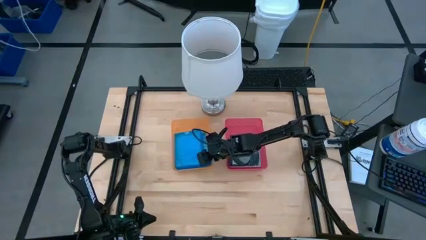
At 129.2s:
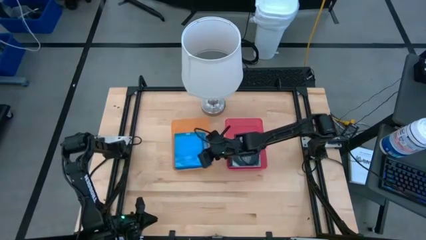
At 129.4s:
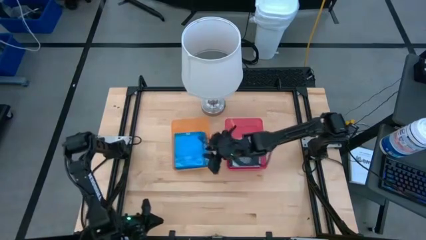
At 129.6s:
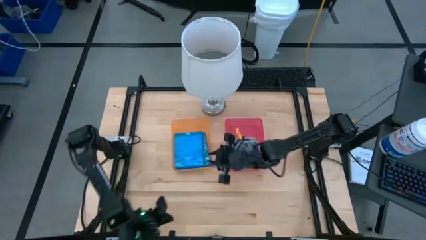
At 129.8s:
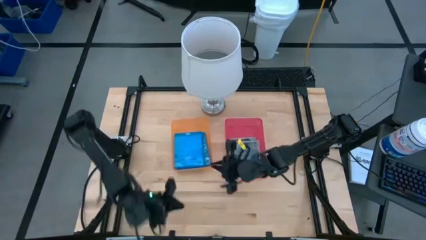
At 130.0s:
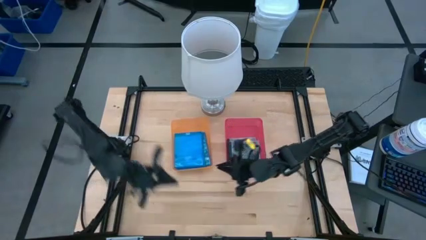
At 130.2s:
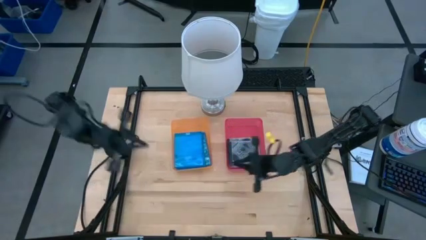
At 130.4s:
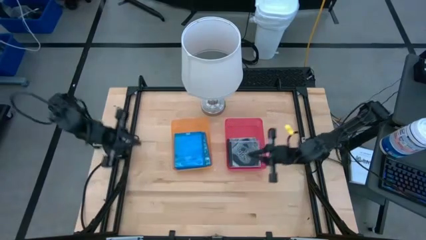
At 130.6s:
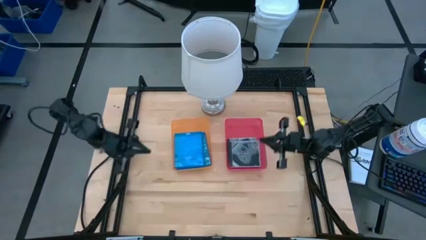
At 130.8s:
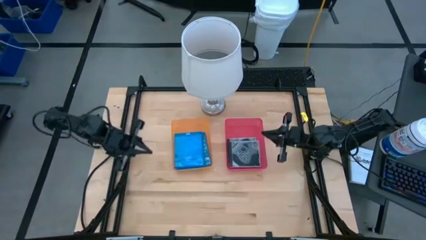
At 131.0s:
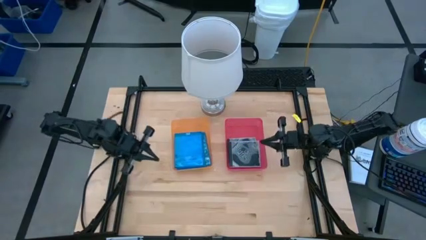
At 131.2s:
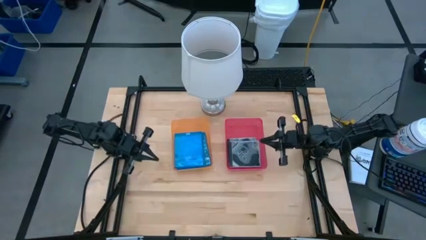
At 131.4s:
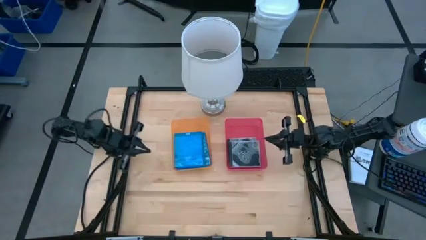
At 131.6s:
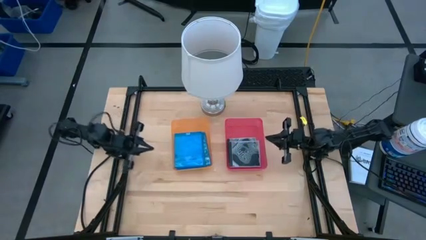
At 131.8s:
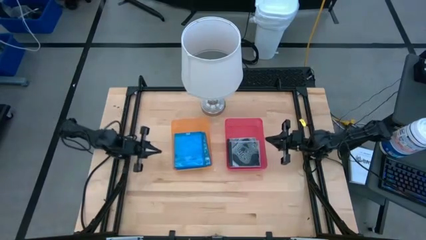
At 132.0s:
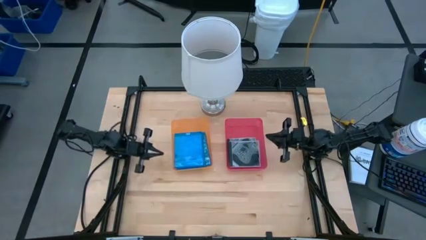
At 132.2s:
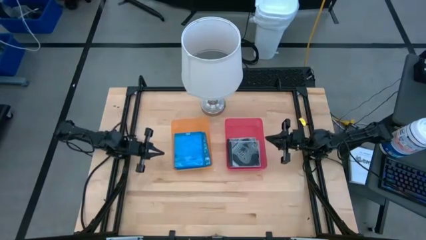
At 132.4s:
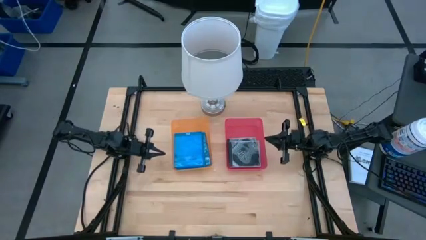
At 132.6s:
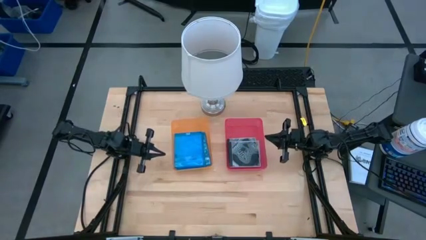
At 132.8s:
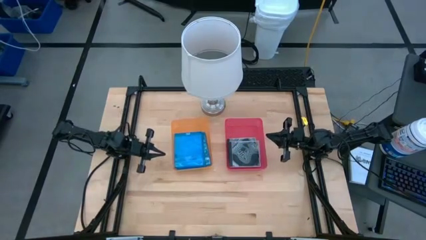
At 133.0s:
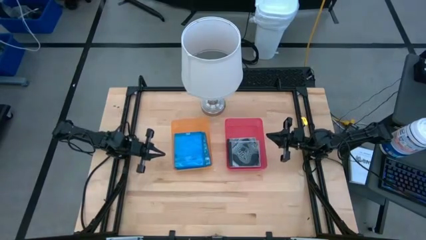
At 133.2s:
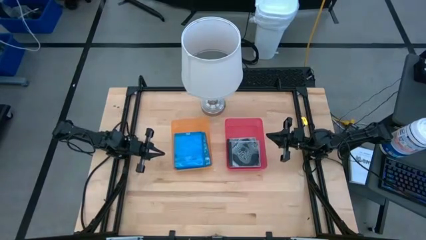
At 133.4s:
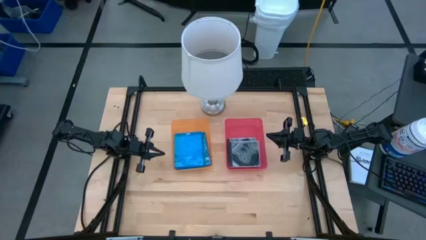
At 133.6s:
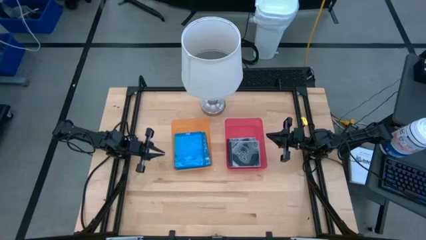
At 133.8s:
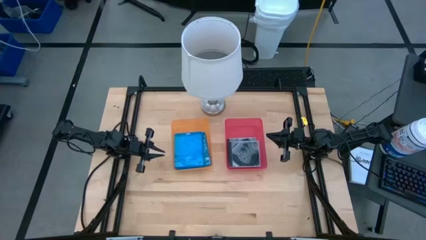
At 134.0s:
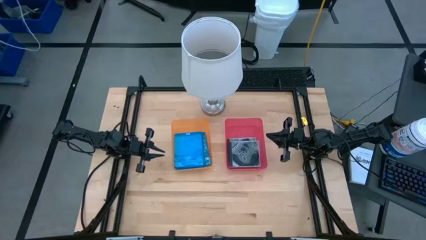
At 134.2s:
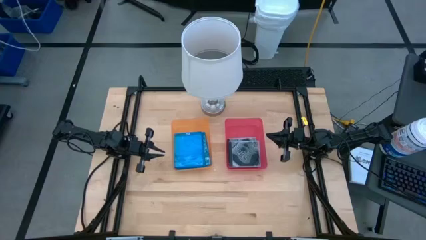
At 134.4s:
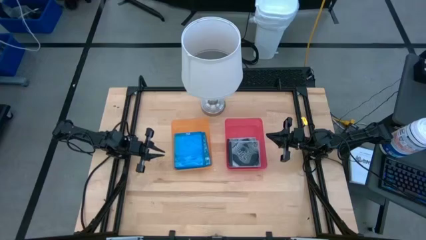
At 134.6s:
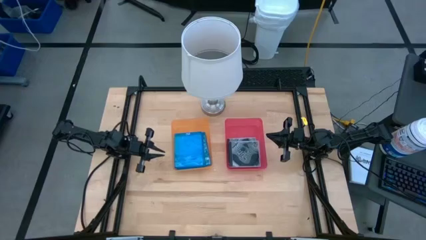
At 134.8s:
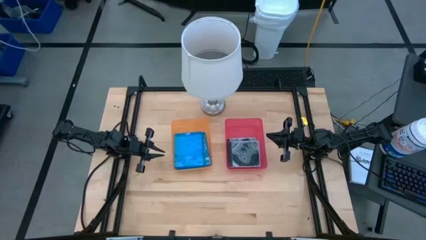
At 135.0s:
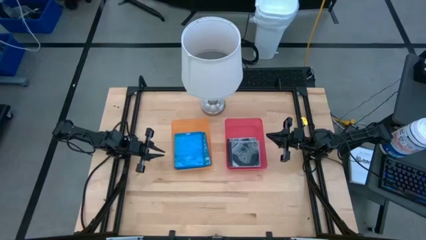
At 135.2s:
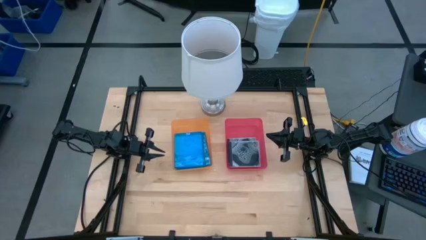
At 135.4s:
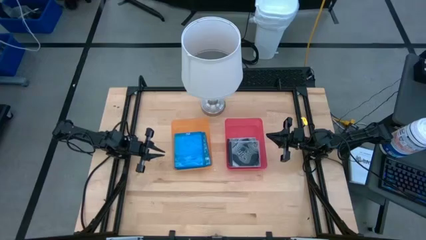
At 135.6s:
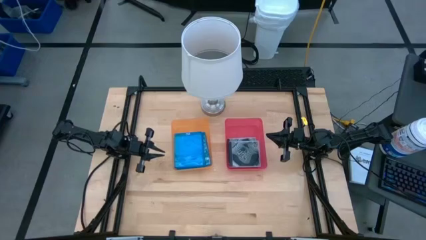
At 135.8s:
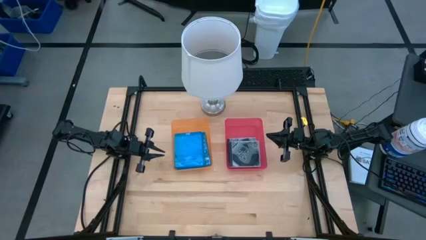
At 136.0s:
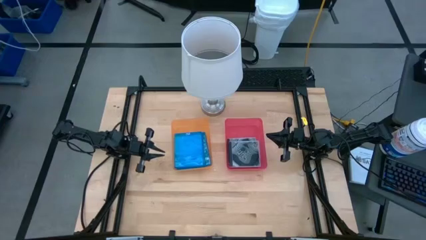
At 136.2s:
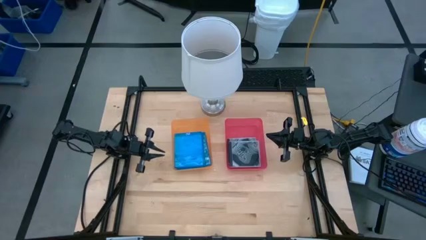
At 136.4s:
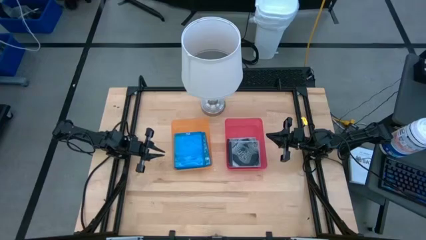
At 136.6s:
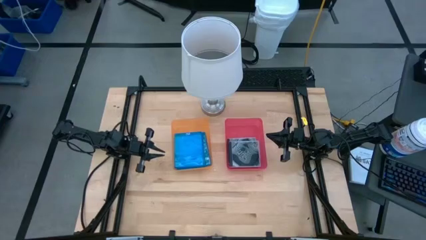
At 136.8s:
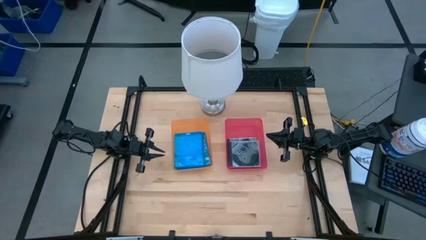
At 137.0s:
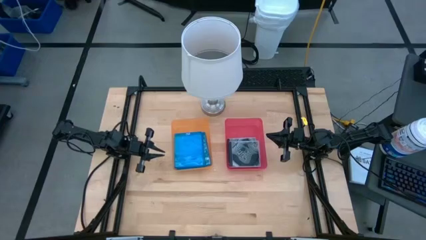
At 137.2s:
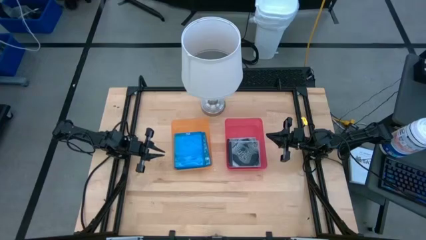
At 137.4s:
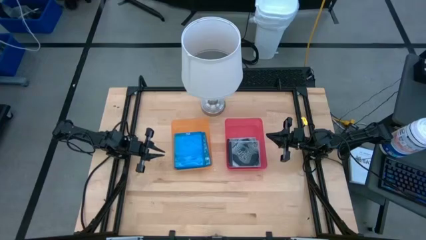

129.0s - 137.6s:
Task: Pick & place jewel cases by type
Return to Home Position

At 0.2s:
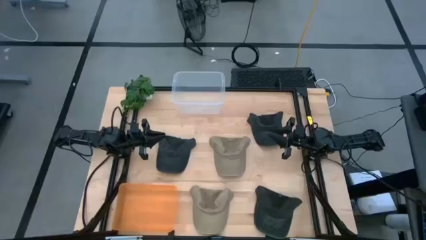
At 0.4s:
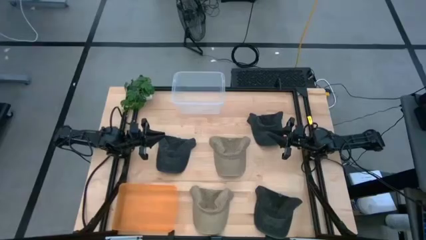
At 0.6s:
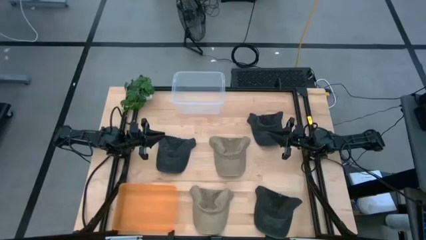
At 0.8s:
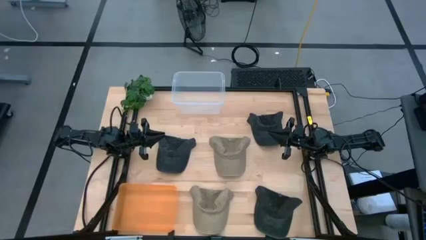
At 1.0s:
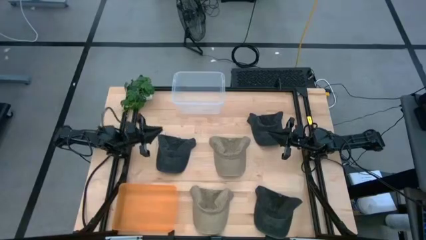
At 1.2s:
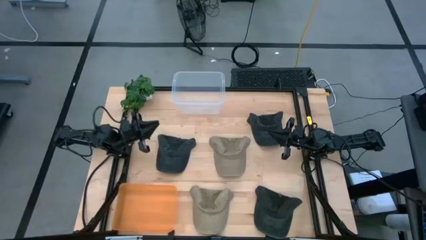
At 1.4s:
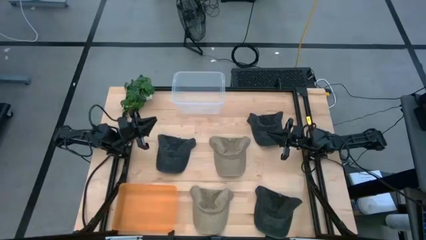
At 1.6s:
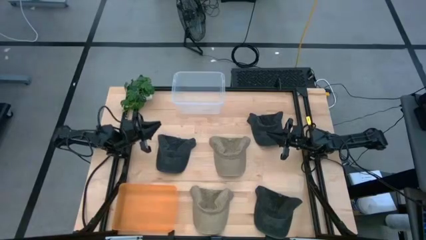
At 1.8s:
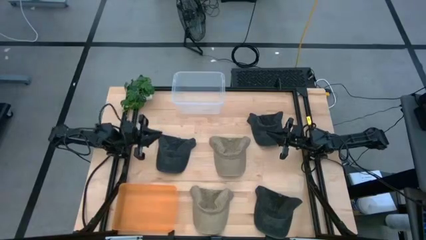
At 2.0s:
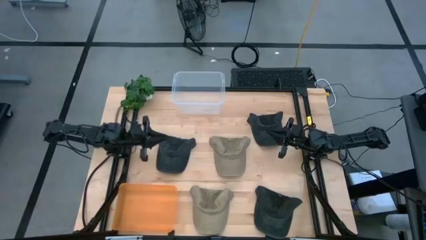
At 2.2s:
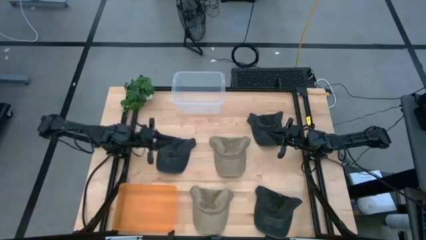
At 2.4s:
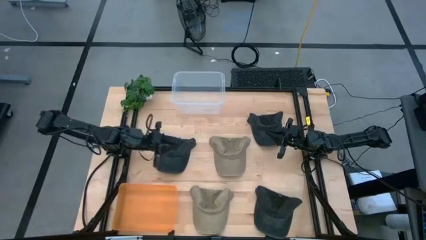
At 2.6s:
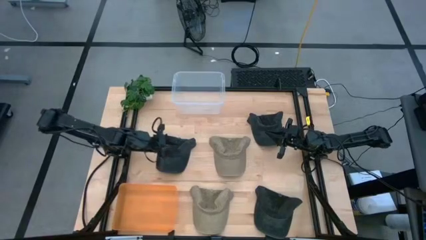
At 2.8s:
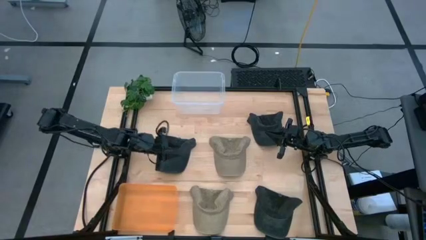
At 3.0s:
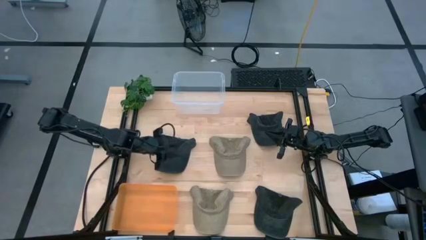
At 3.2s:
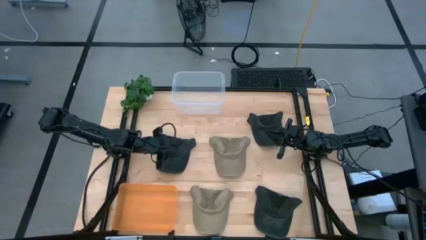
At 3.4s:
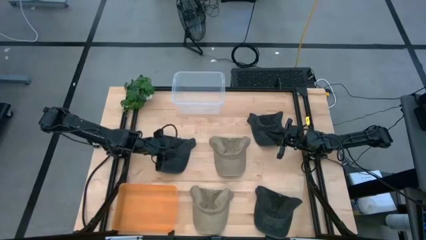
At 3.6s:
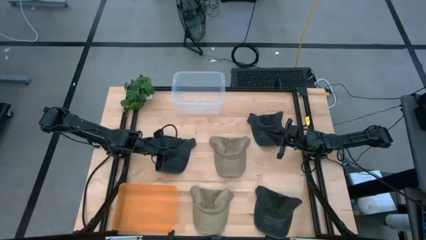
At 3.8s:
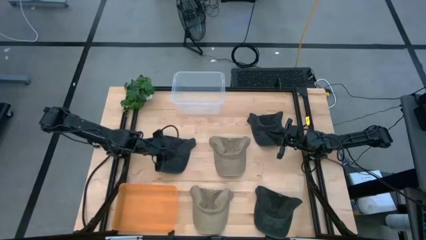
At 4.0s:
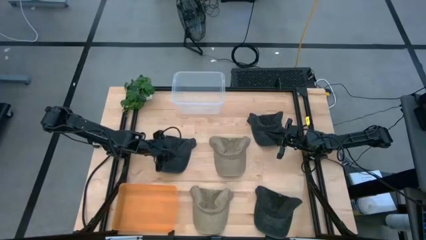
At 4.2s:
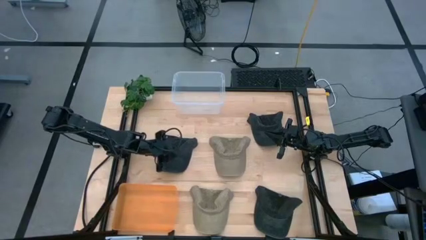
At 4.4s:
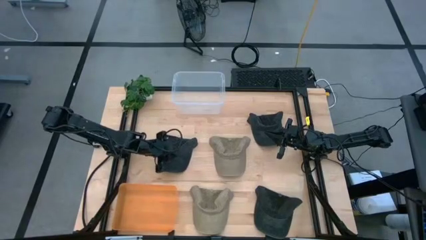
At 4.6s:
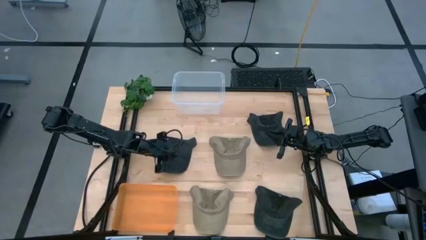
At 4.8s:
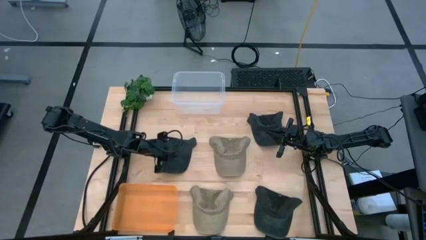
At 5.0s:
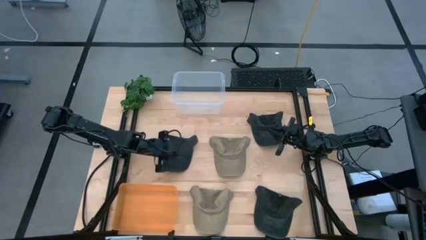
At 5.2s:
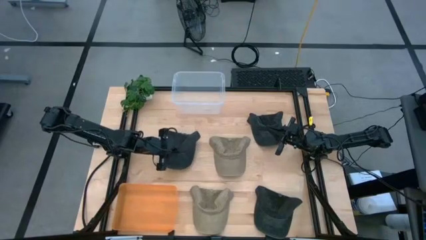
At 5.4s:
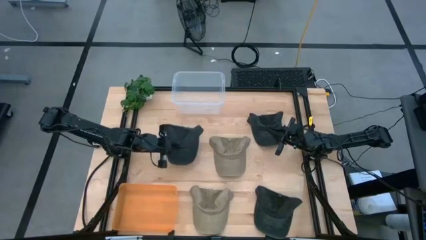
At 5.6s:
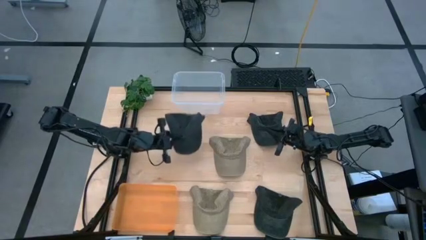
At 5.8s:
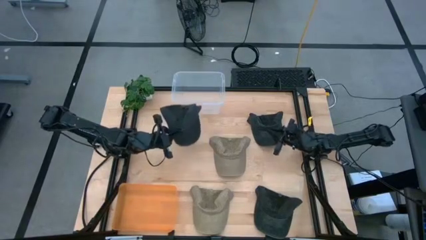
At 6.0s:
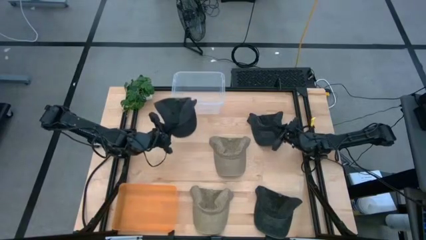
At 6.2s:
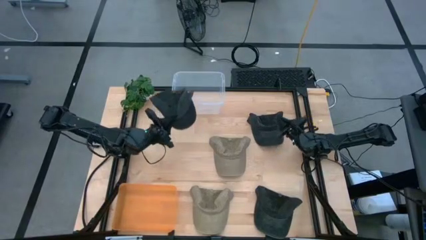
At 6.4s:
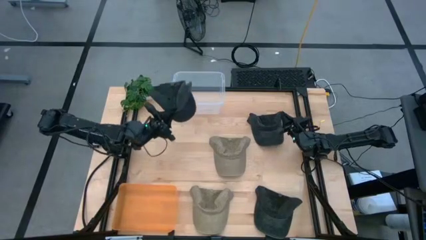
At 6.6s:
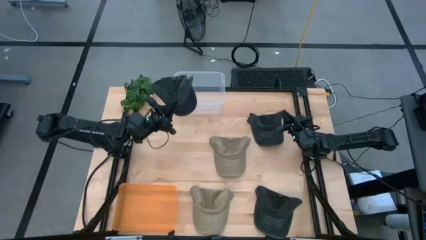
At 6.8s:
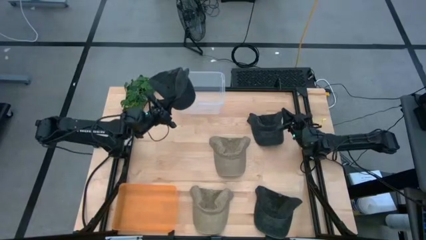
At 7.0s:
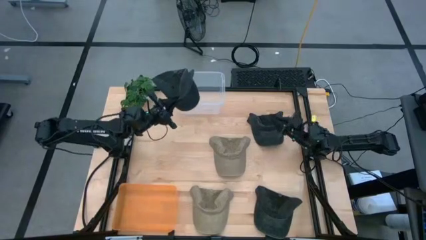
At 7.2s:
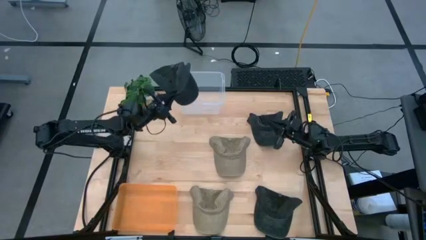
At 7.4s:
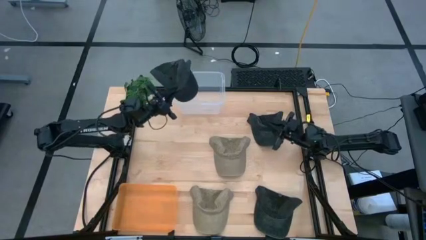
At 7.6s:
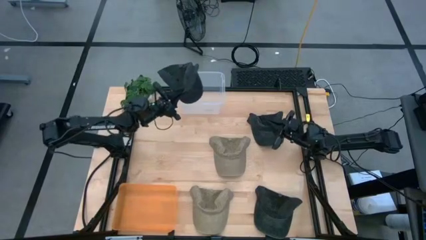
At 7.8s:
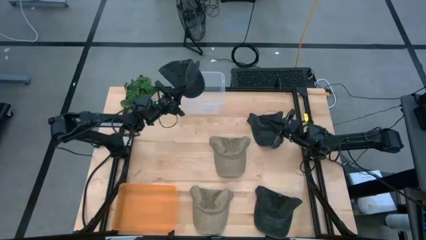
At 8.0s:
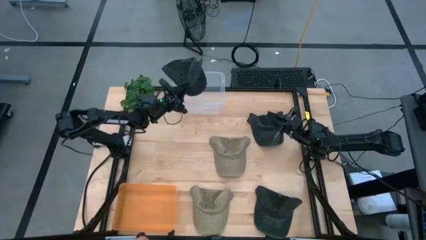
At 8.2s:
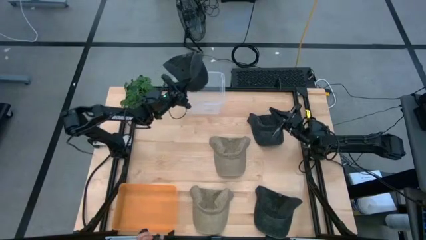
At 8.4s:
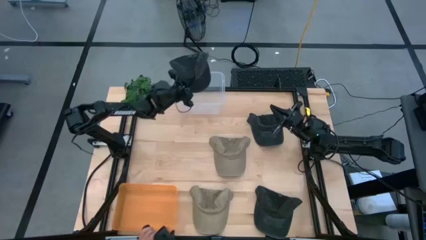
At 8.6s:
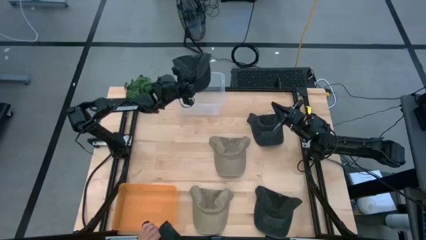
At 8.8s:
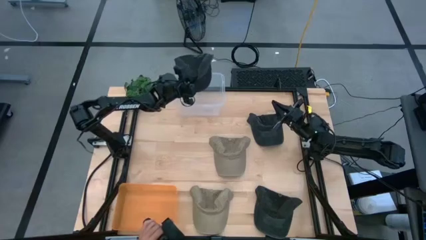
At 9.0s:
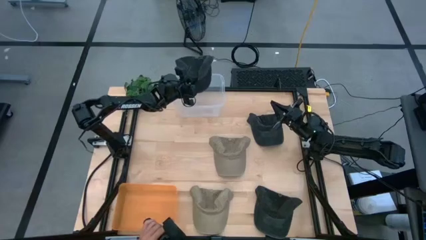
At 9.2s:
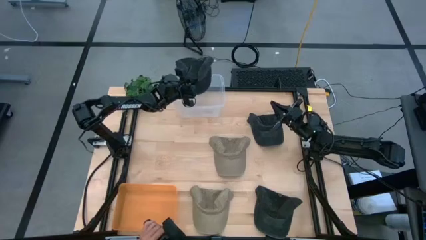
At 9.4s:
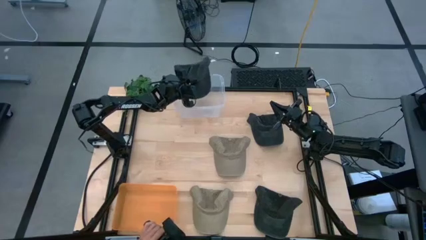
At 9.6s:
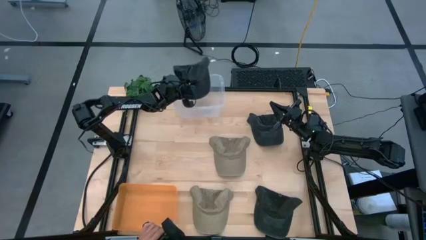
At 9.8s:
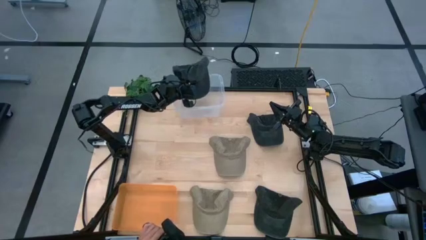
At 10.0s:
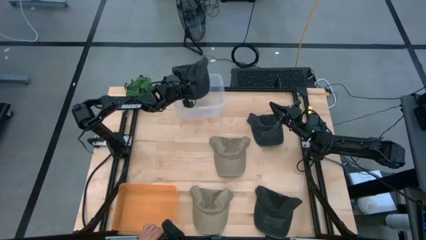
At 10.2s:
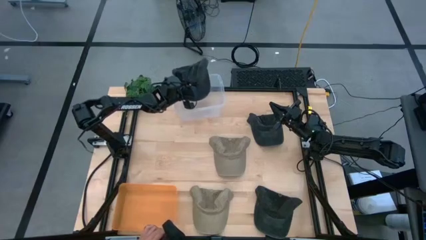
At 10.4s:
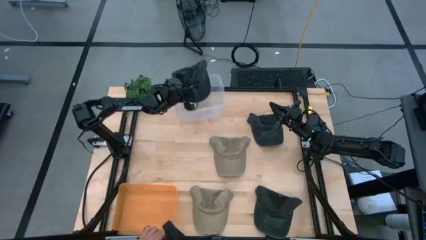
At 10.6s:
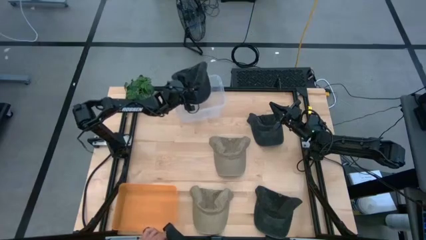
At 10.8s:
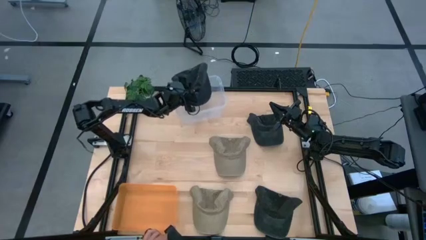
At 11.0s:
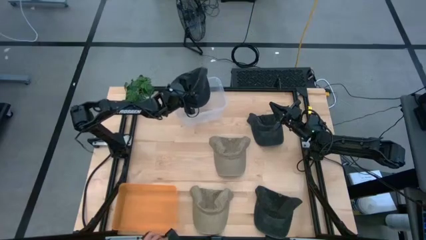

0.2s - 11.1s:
Task: Pick & Place hat
Put the top left black cap into the transparent bin
